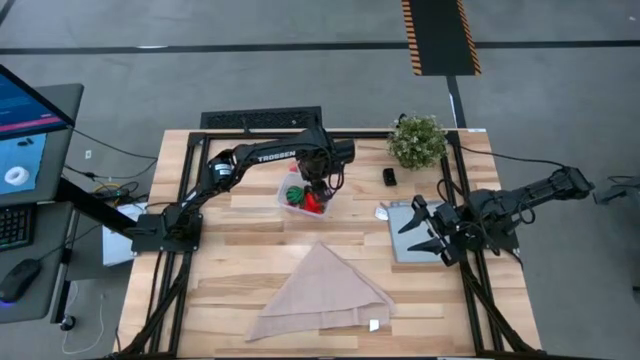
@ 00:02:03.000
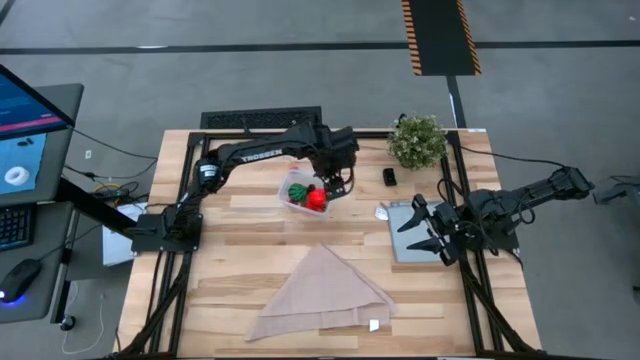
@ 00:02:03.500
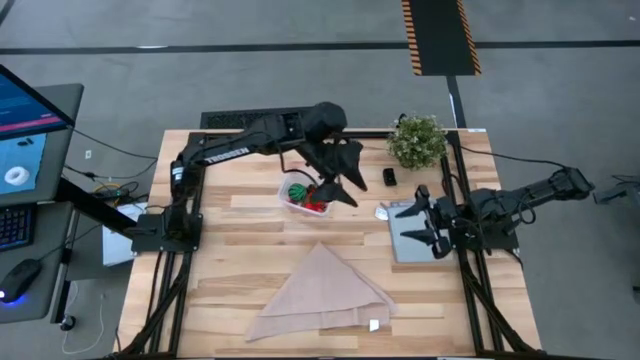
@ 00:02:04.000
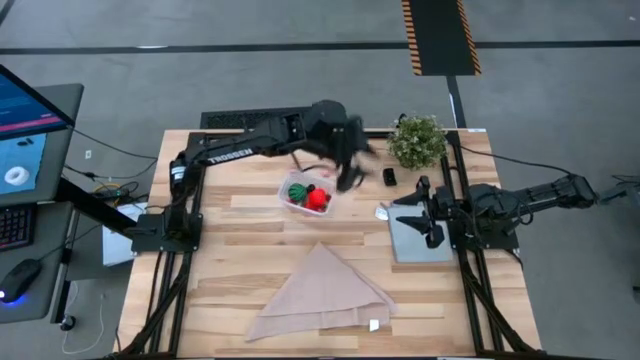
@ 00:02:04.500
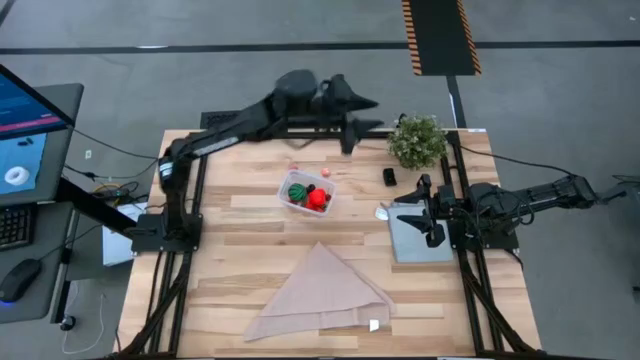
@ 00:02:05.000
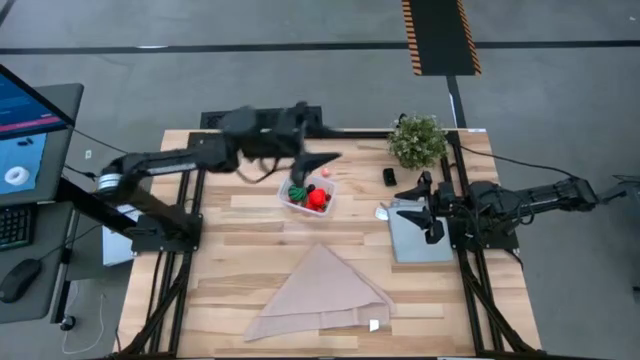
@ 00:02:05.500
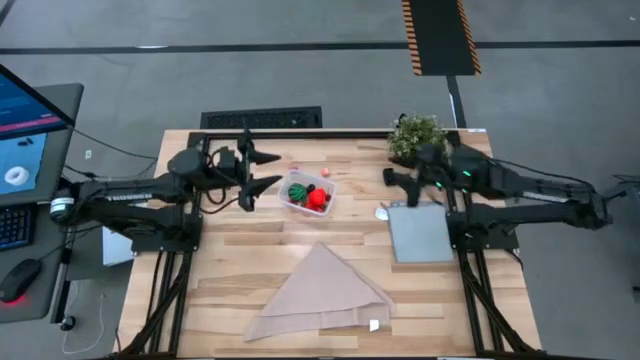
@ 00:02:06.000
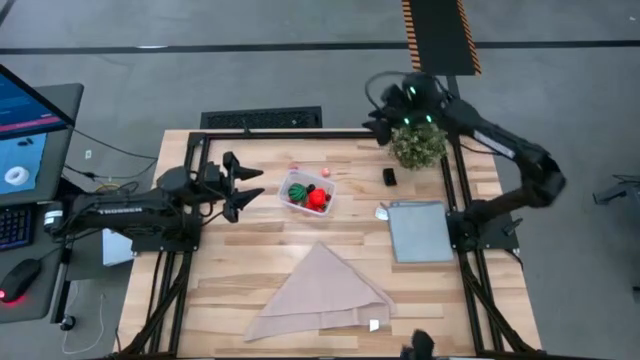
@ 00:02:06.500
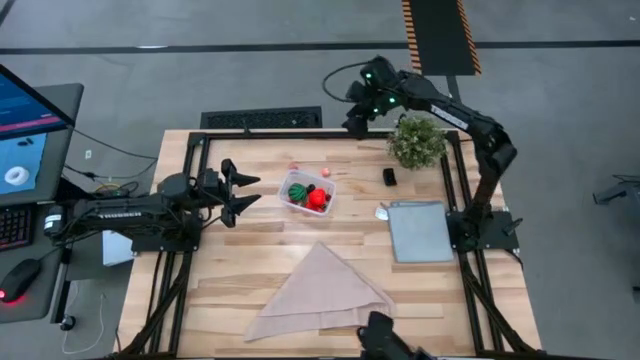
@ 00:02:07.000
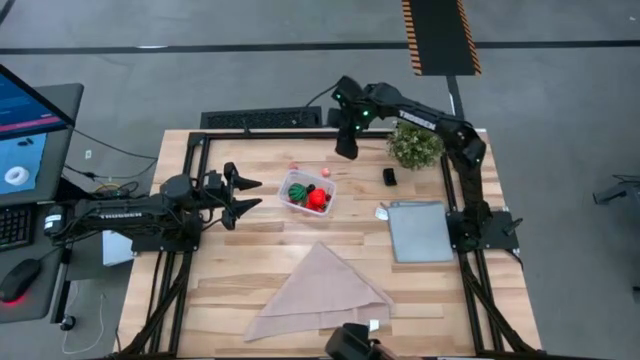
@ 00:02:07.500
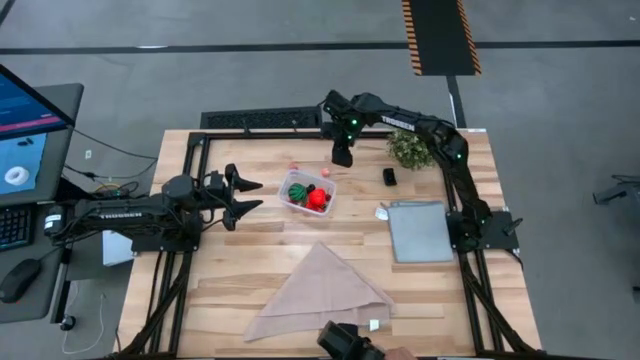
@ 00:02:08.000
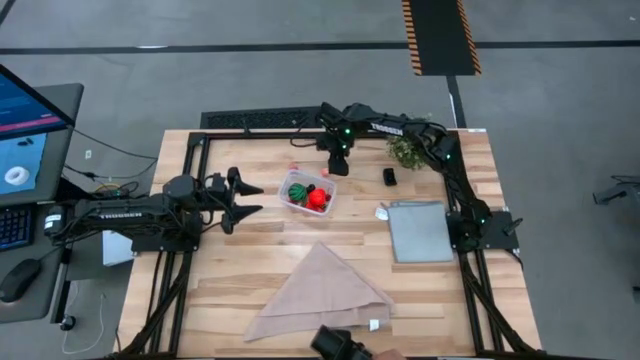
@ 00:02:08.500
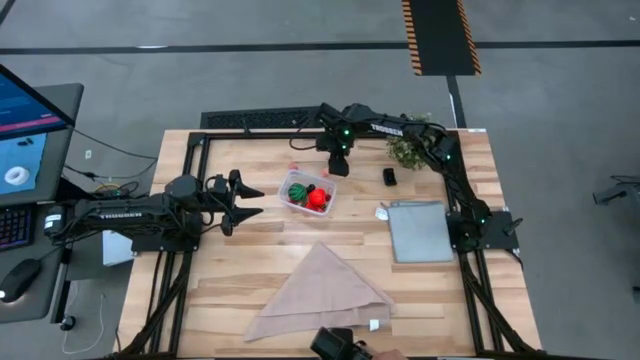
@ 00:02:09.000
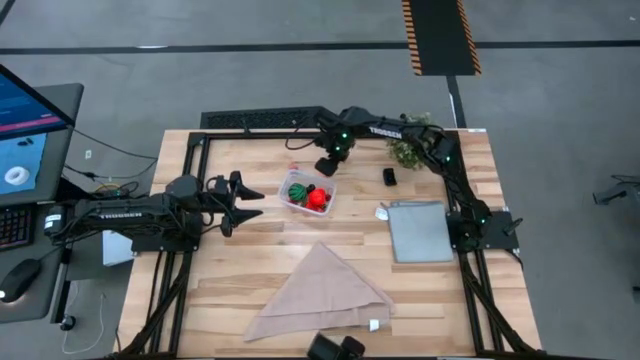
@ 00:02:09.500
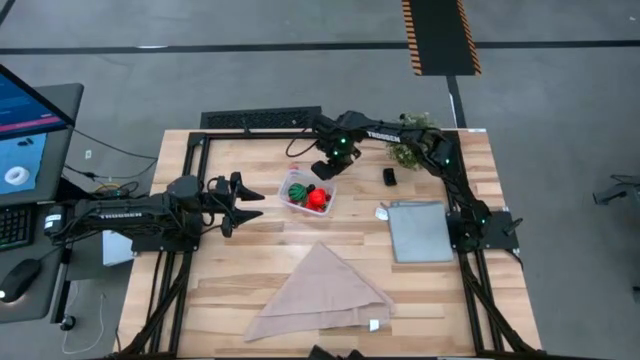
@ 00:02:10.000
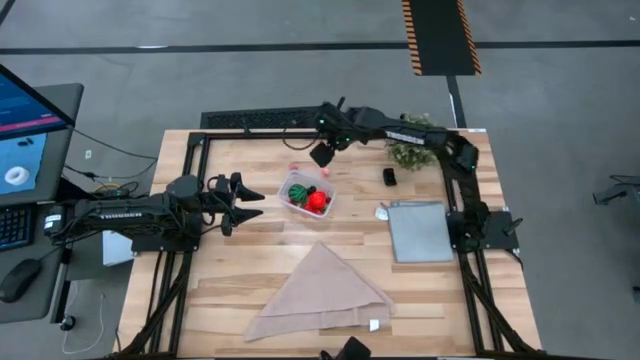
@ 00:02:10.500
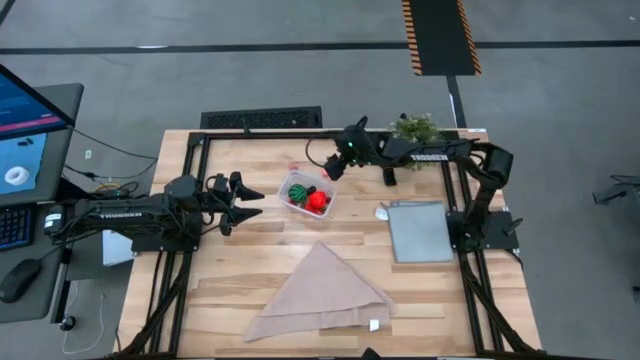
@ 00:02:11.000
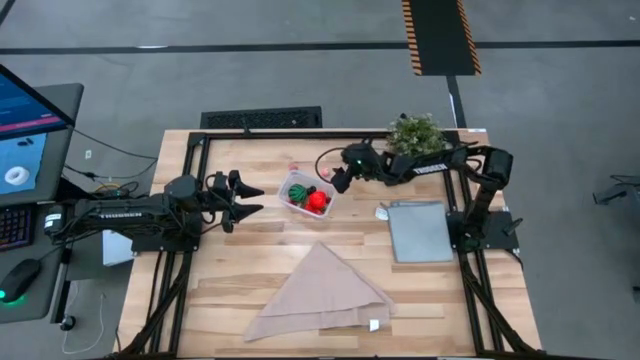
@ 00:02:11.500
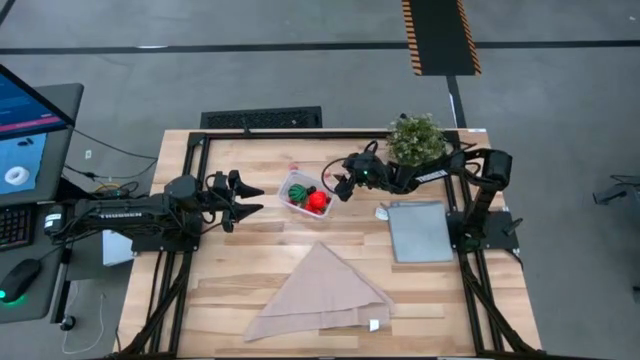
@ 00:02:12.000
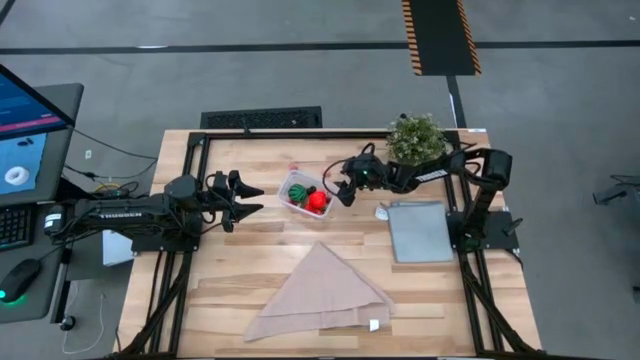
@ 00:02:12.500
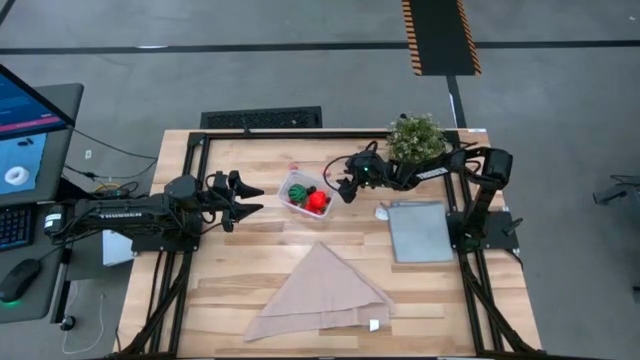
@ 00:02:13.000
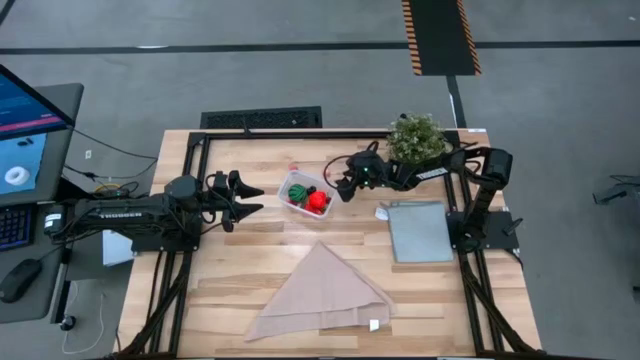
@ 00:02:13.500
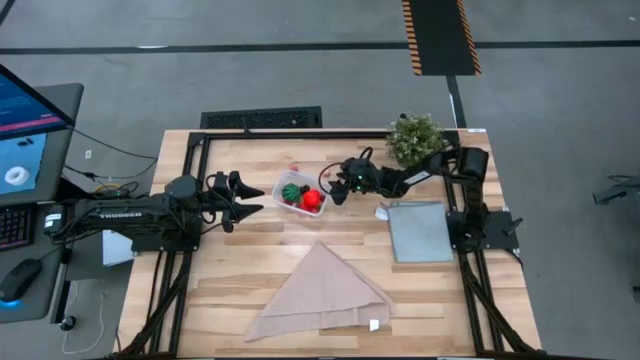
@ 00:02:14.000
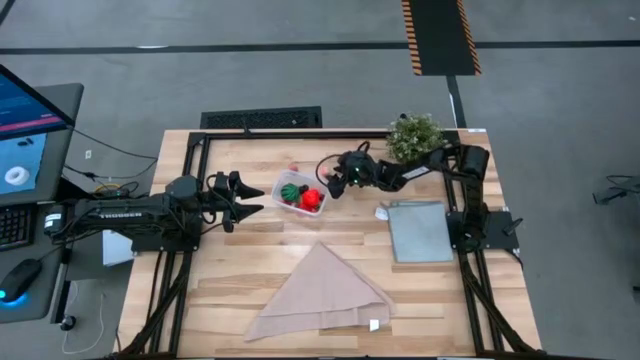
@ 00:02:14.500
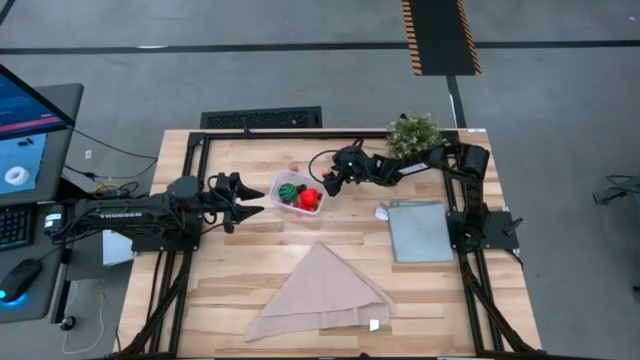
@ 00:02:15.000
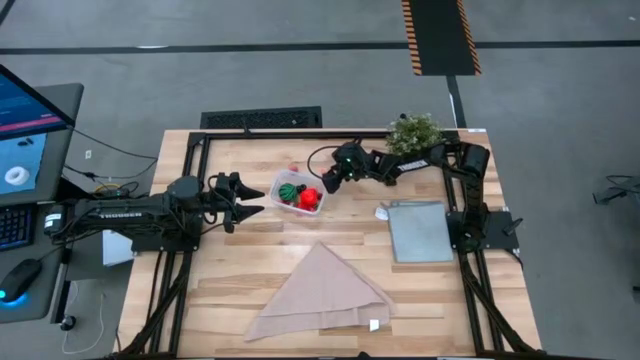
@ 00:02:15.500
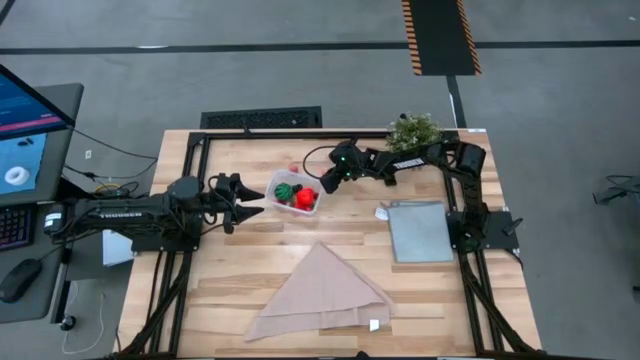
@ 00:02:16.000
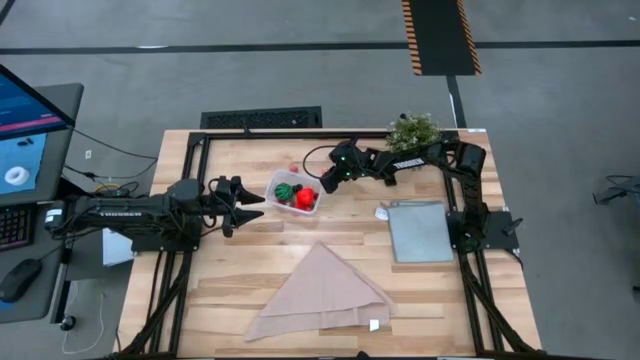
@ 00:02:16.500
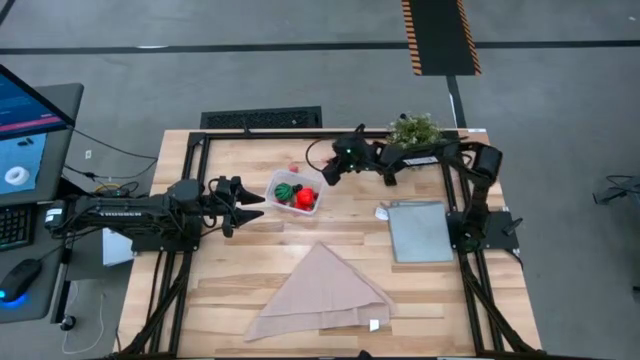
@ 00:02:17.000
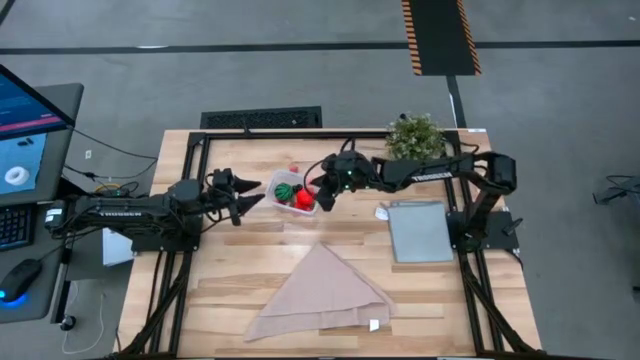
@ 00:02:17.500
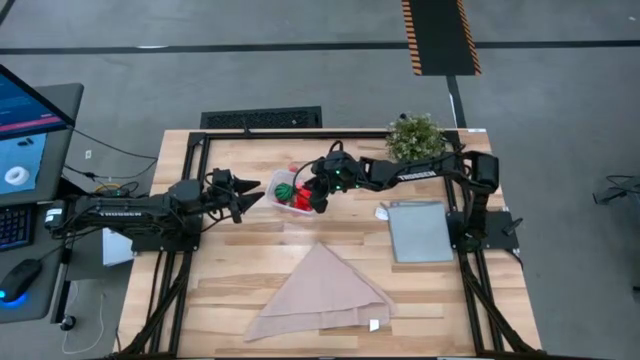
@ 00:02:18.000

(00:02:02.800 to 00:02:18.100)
Task: Pick and placing Produce into tupperware
Put the right peach into the transparent bin

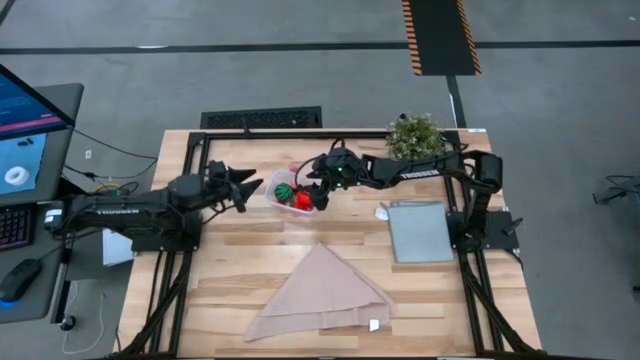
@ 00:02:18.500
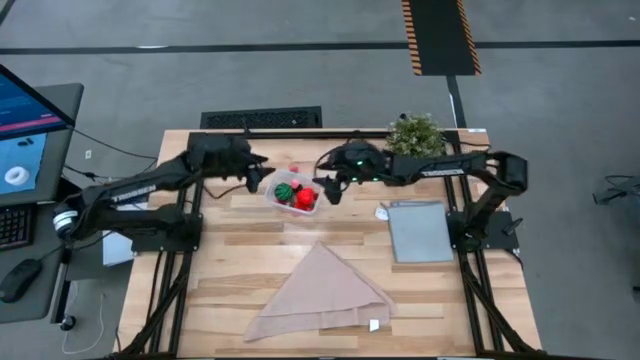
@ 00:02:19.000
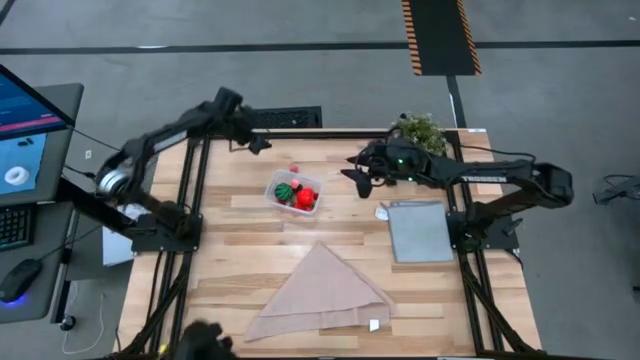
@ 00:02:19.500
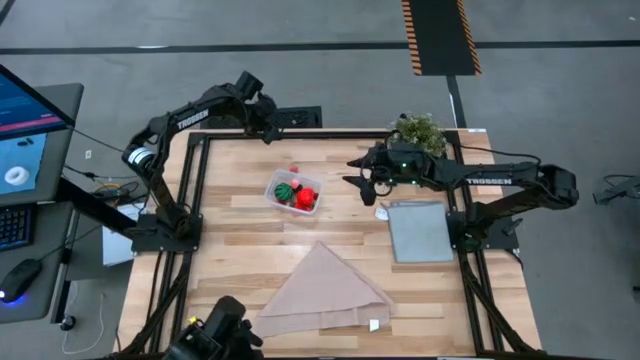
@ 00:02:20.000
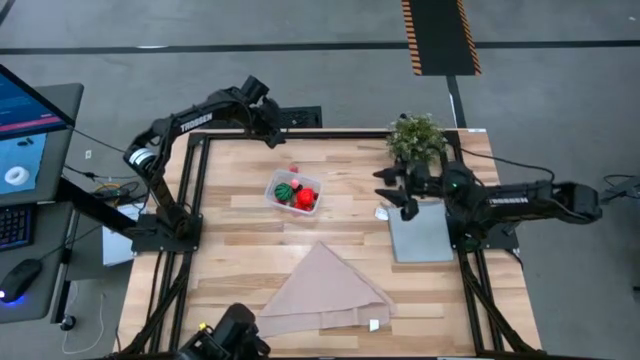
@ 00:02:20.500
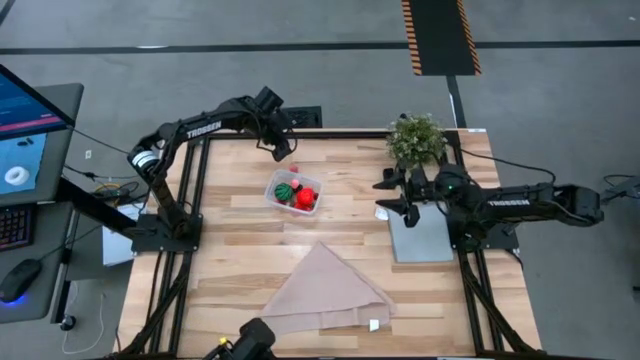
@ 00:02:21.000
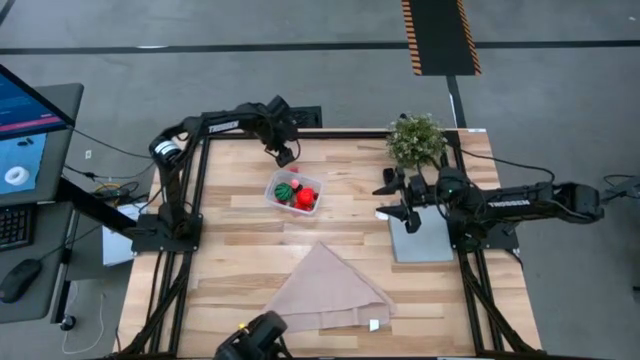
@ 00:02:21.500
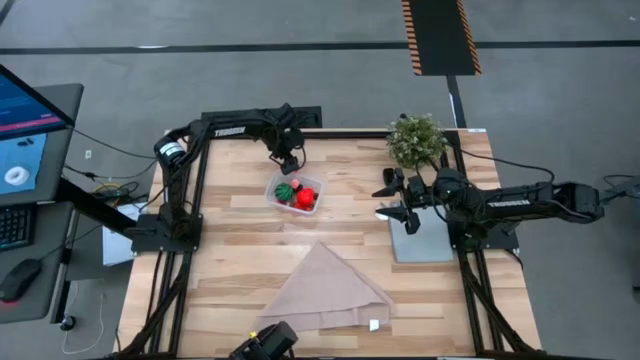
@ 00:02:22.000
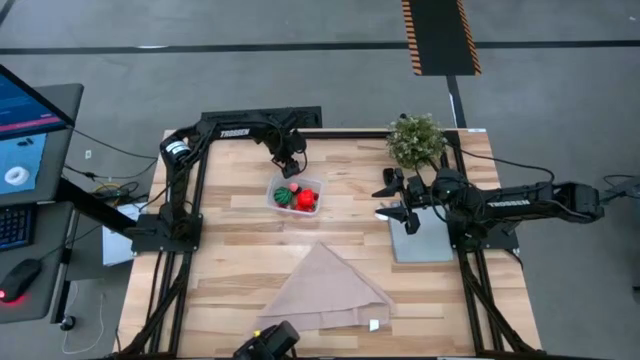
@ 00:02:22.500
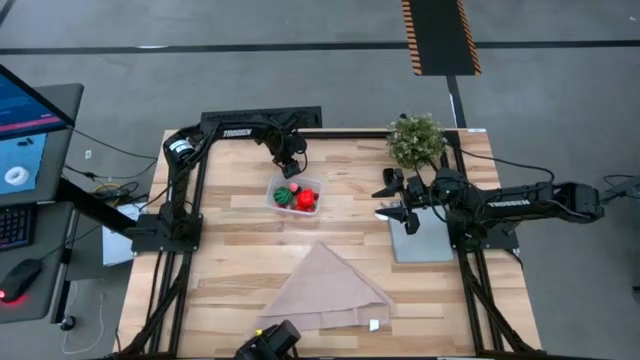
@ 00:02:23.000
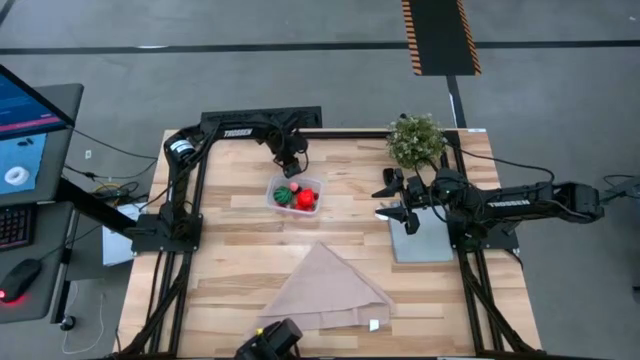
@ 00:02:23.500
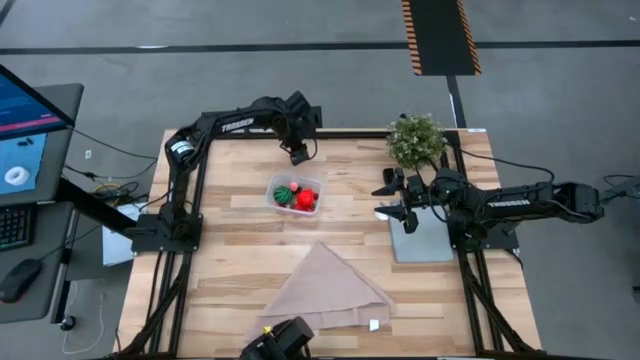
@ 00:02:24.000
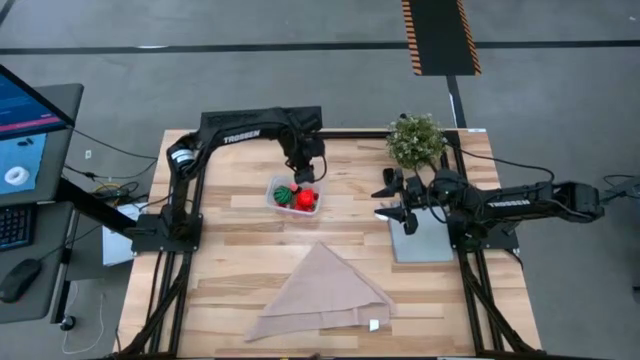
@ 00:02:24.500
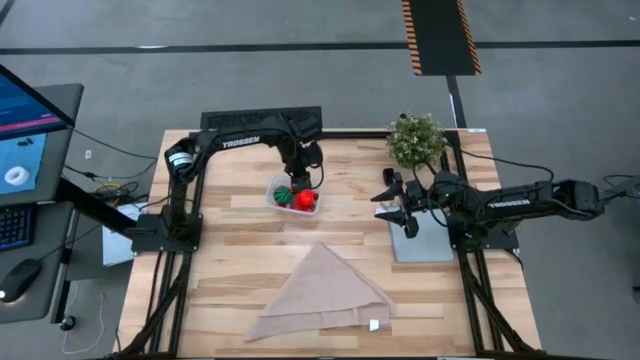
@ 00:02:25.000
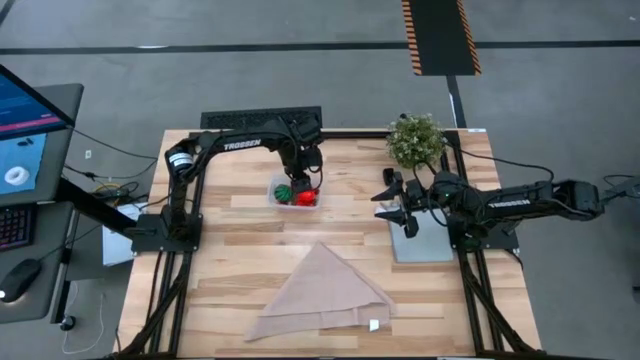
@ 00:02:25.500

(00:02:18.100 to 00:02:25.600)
Put the peach into the transparent bin
